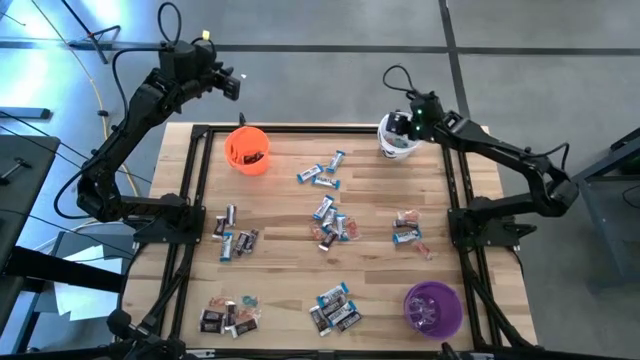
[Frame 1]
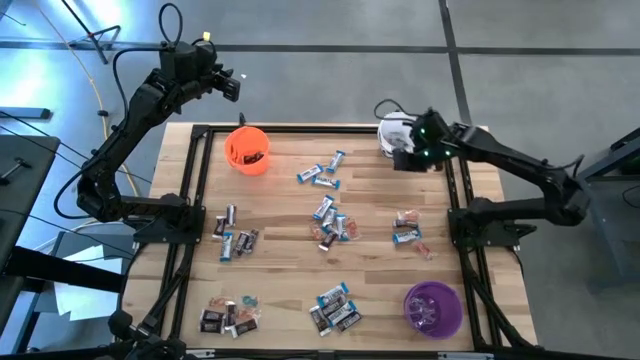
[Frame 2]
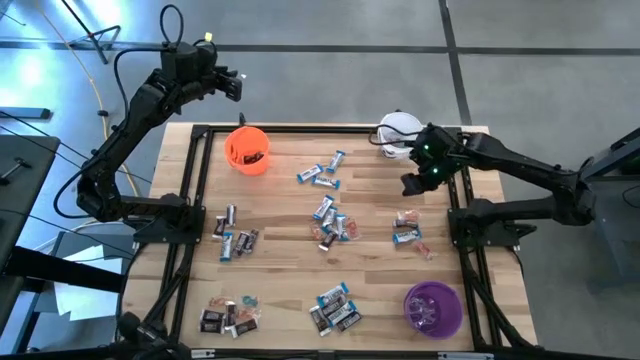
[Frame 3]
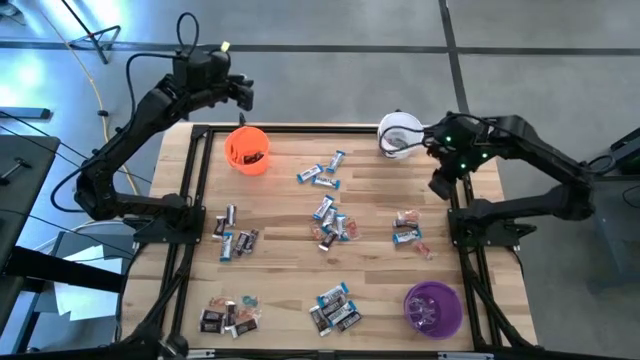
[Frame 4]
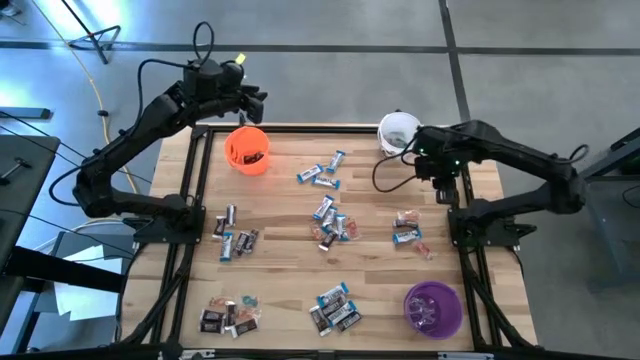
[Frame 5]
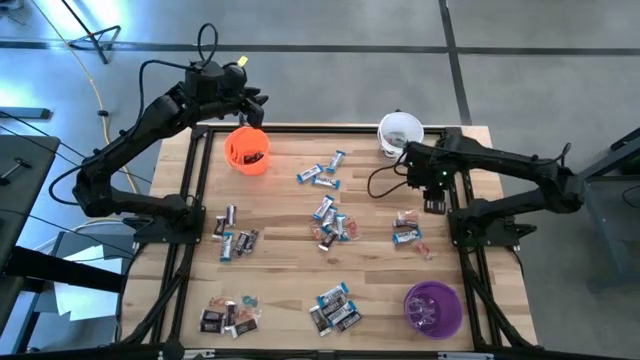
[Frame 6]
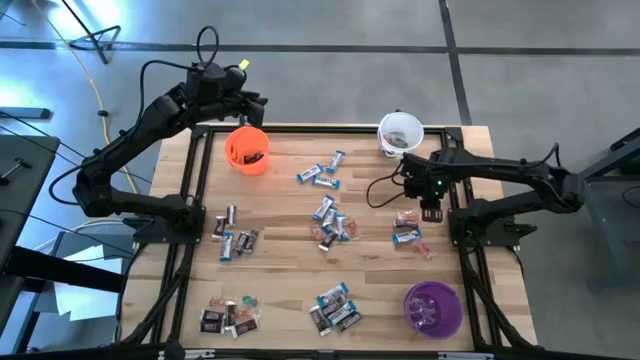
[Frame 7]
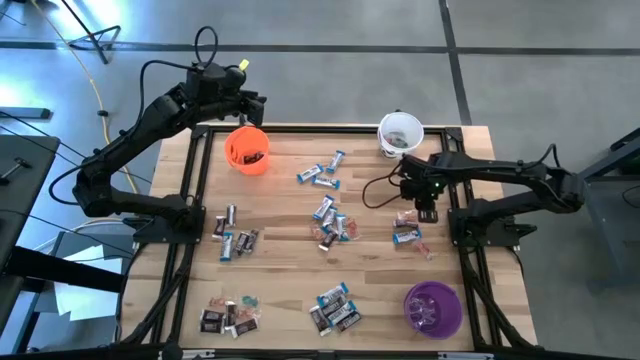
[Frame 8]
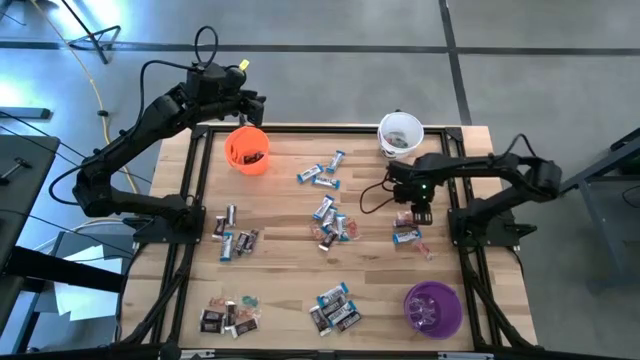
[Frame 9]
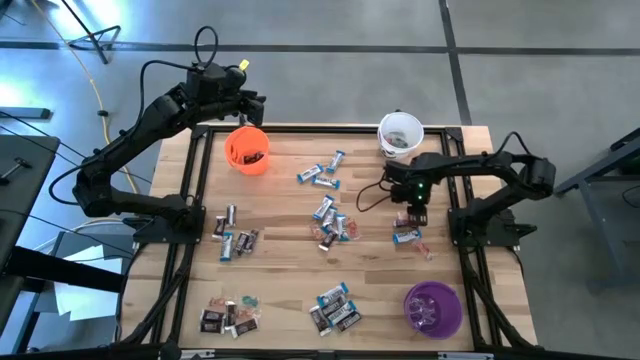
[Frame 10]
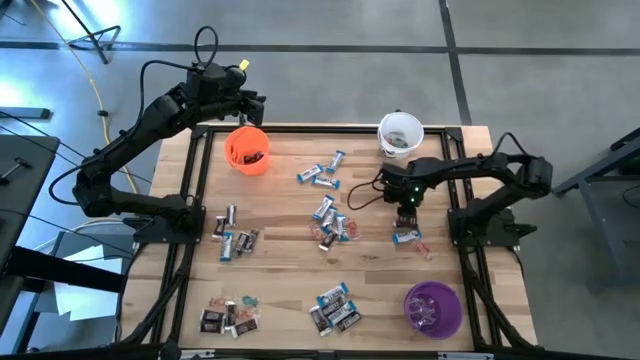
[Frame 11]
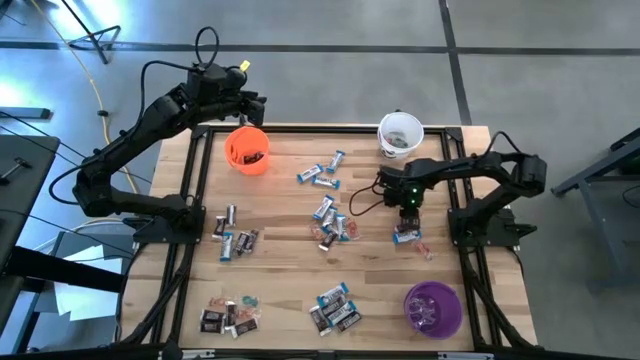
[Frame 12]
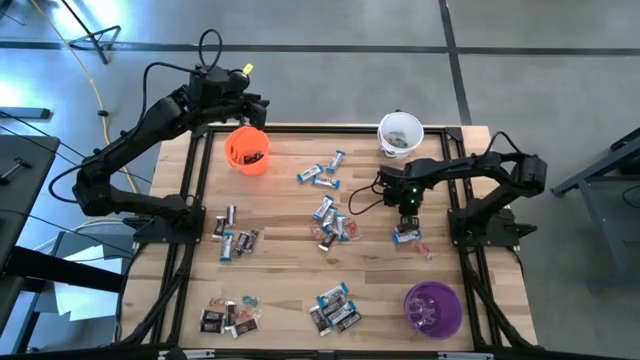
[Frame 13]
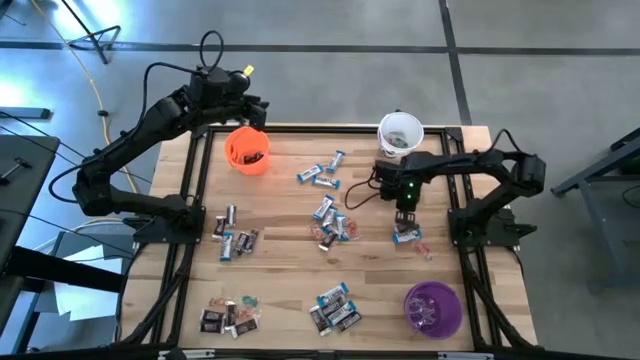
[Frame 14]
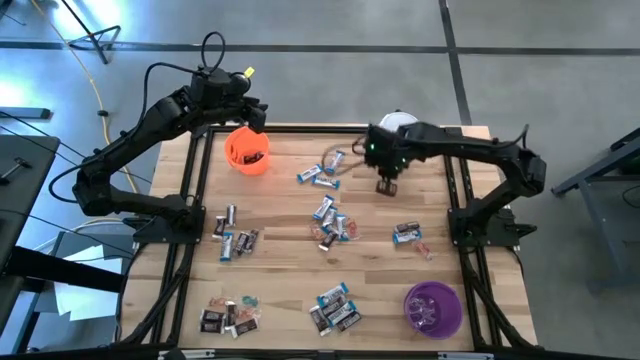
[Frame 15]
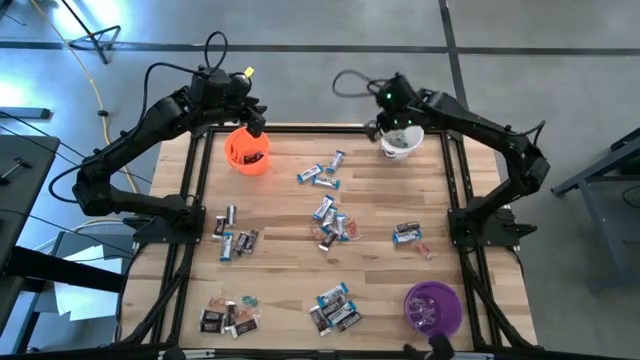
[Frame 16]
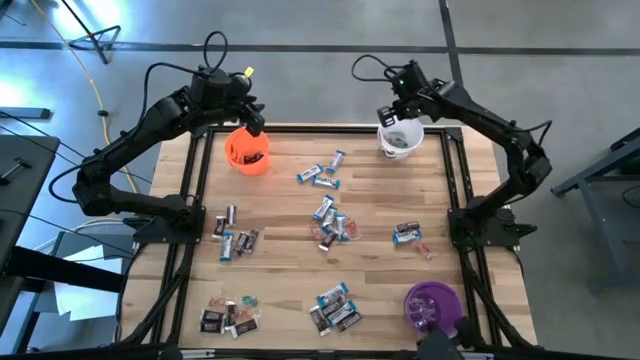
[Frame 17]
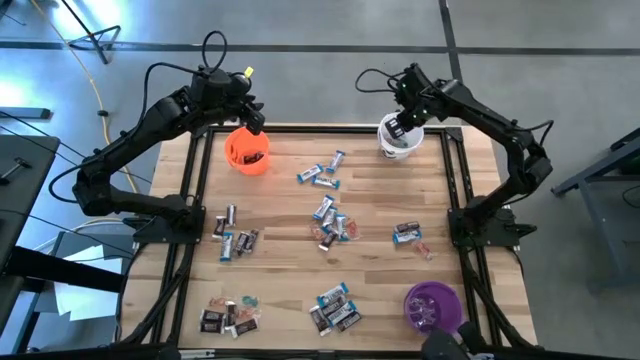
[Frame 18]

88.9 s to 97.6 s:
Task: Sort candy
Put the orange gummy into the white bucket

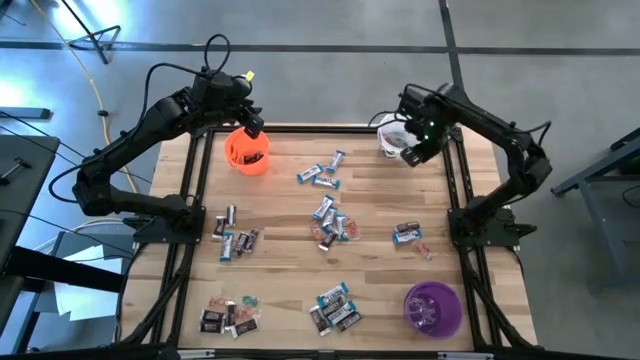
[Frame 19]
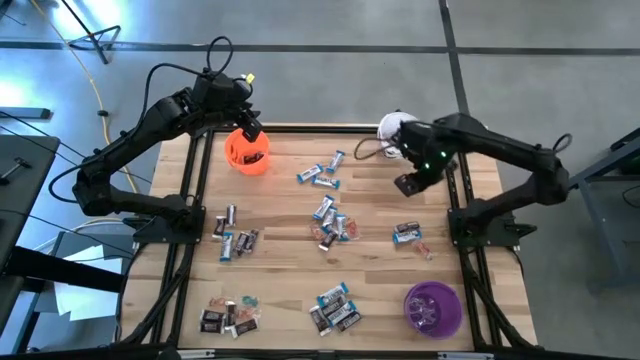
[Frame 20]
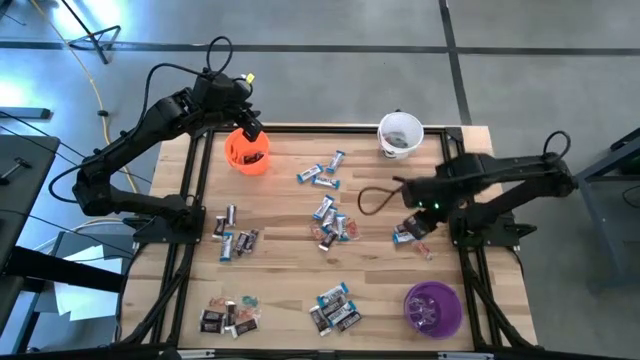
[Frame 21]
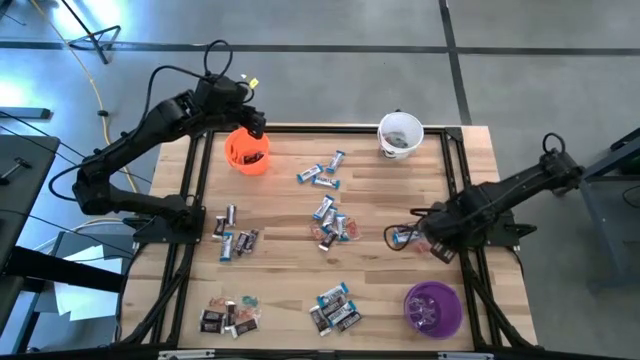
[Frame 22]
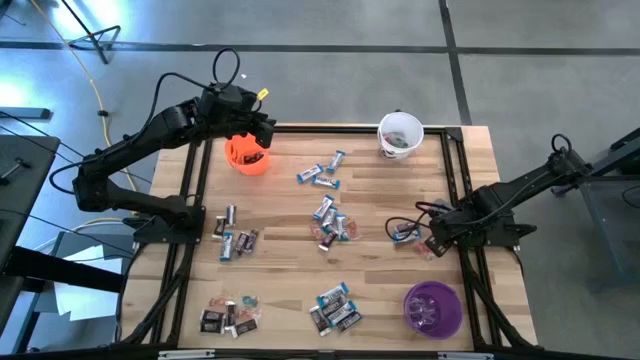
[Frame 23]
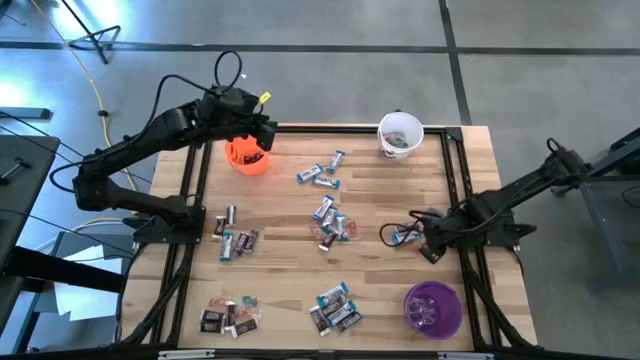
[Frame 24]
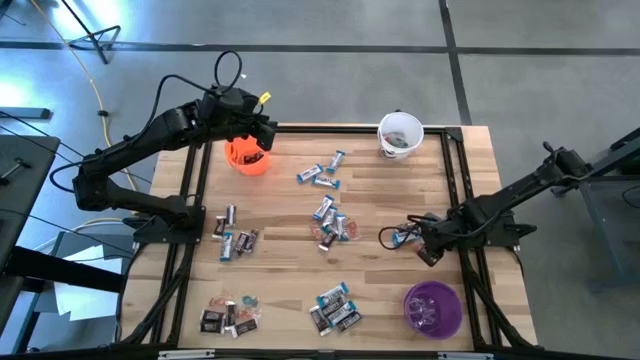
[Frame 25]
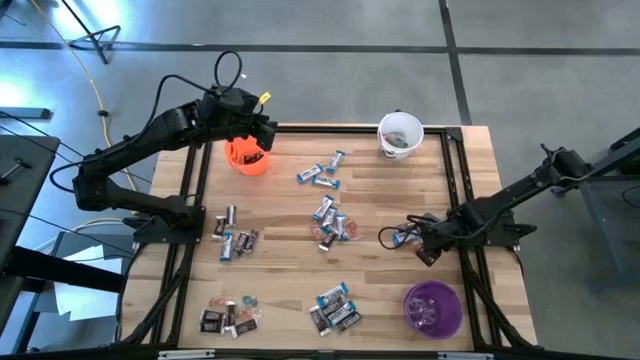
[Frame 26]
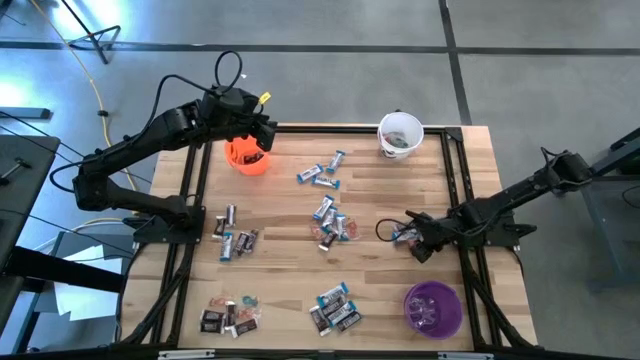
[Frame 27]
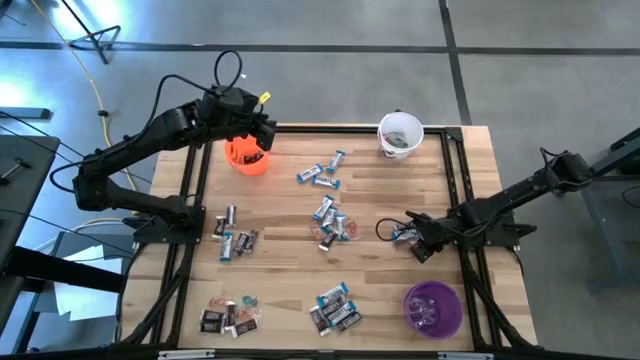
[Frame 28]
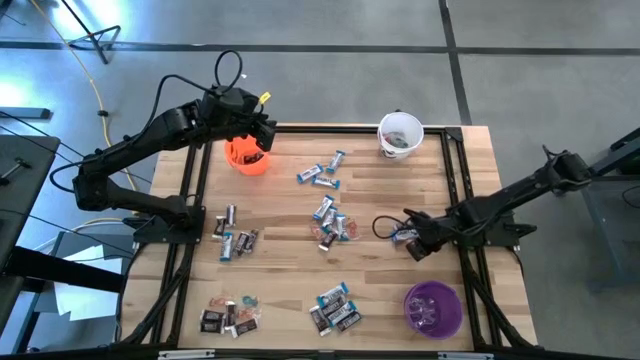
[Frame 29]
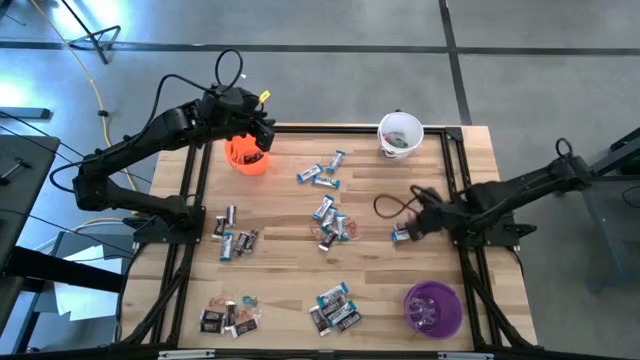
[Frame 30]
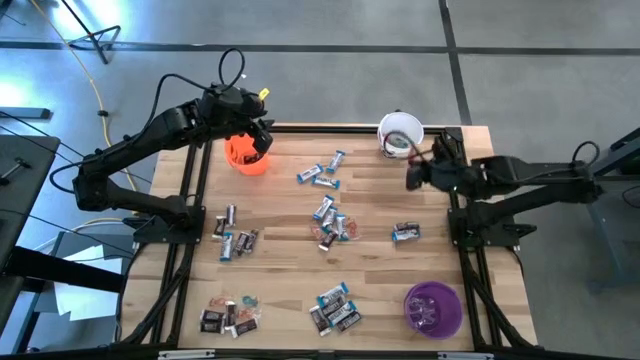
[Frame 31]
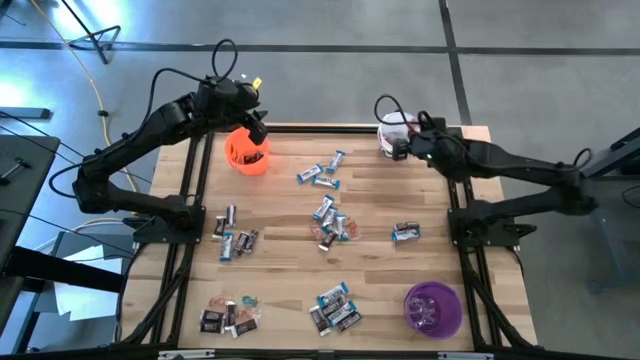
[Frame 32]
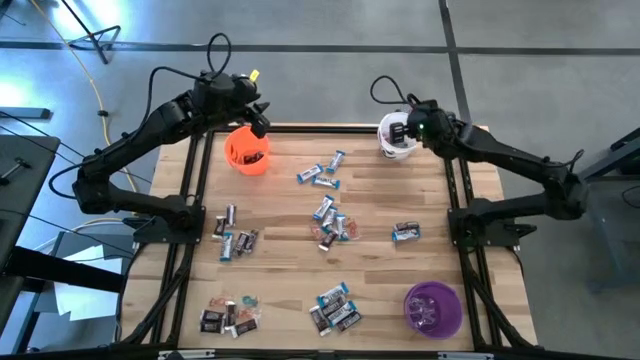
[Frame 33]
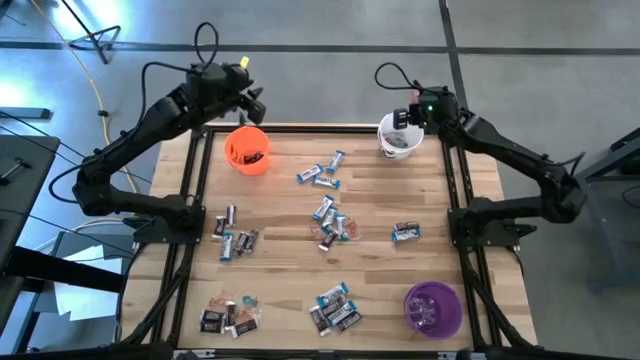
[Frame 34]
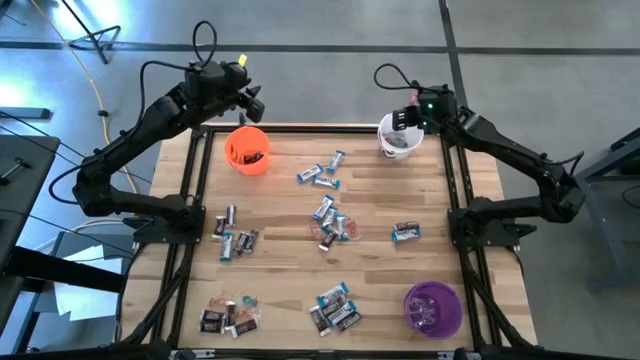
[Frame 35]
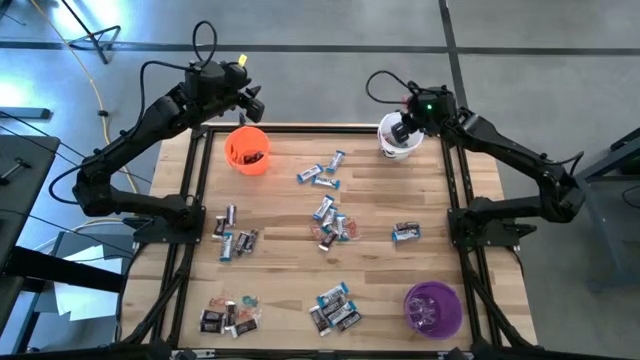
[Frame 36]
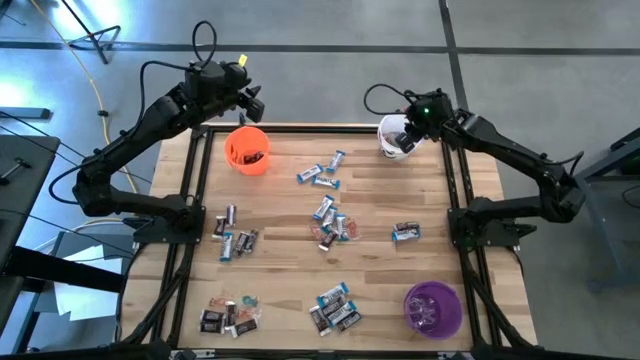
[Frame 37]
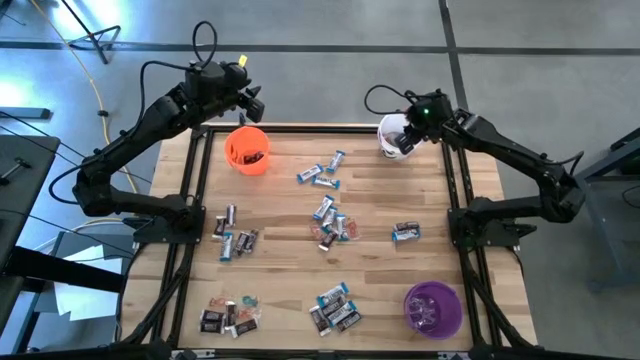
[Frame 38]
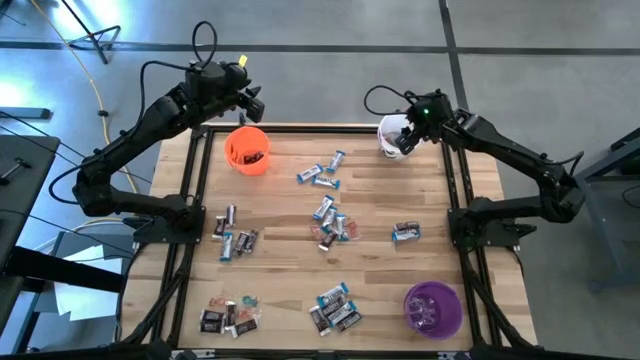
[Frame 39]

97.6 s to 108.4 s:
Put the red gummy into the white bucket

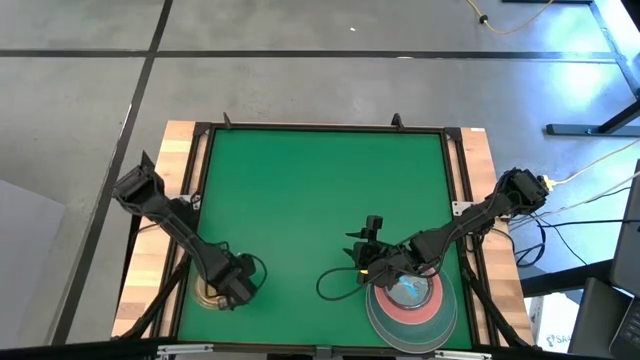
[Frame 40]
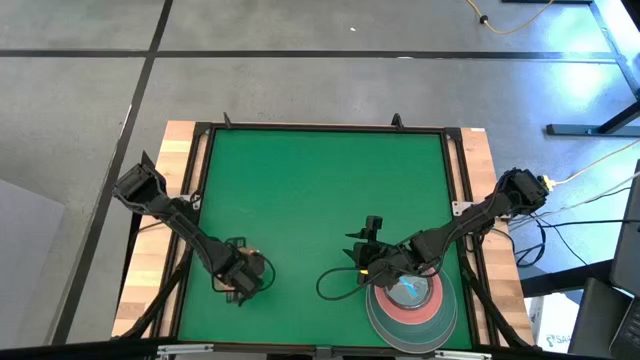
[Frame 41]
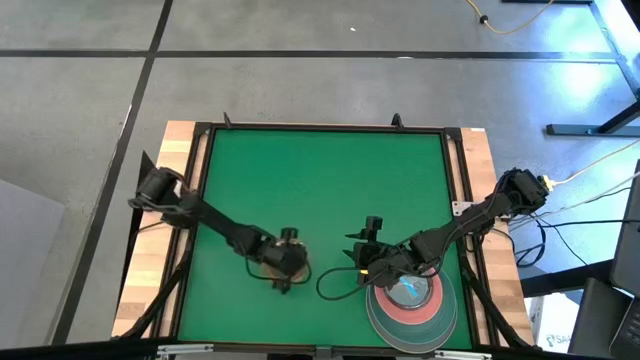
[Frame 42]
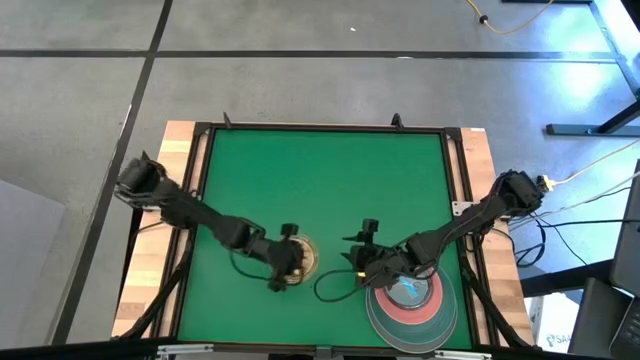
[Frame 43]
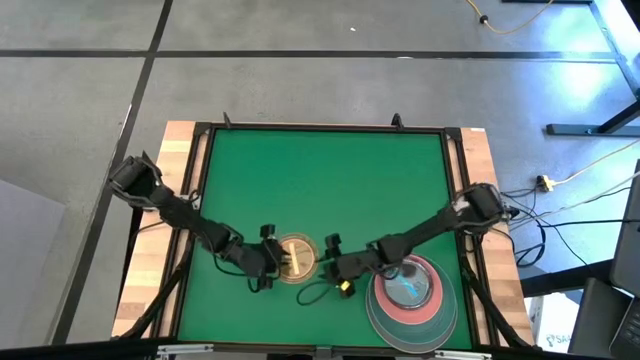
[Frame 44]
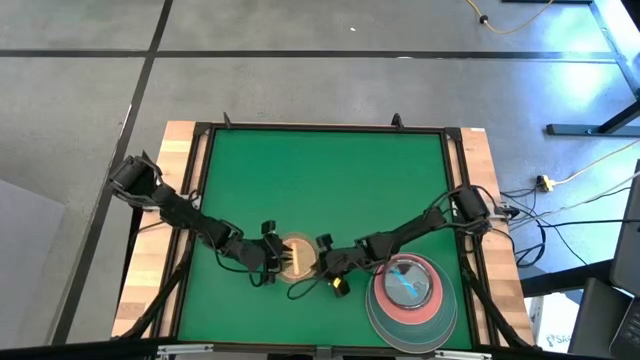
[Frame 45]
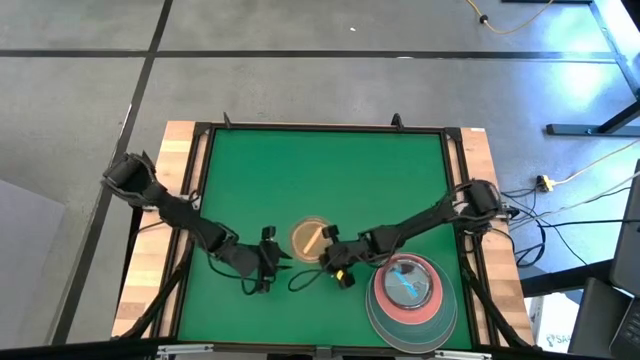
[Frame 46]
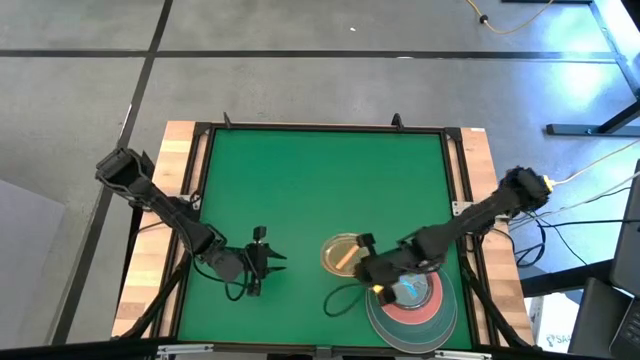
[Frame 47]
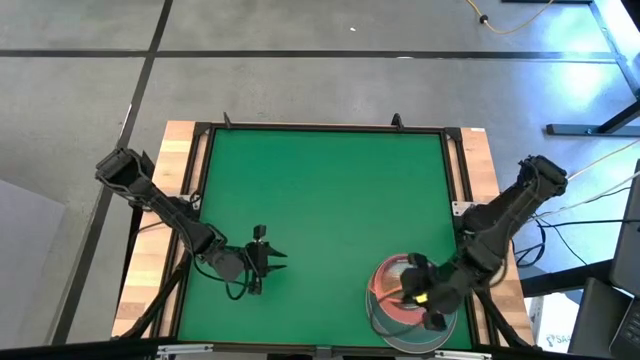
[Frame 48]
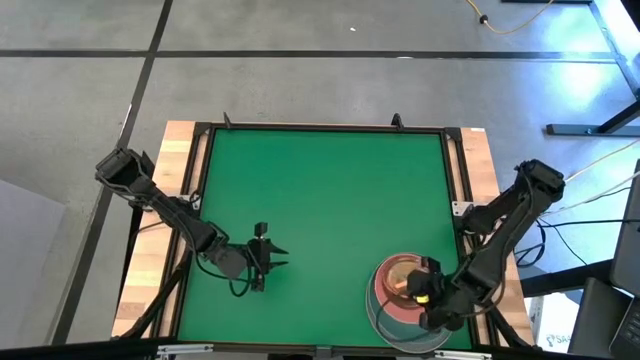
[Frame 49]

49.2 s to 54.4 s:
Task: Stack plastic plates
Stack the transparent orange plate on top of the transparent blue plate
